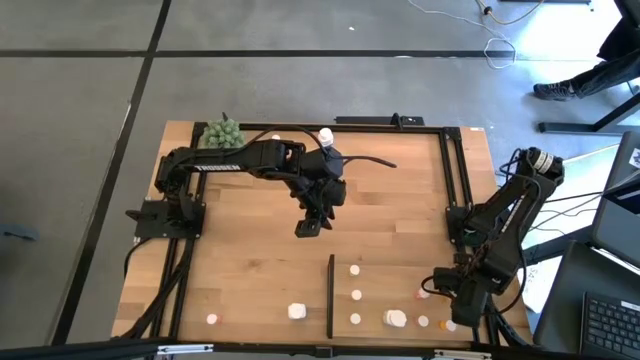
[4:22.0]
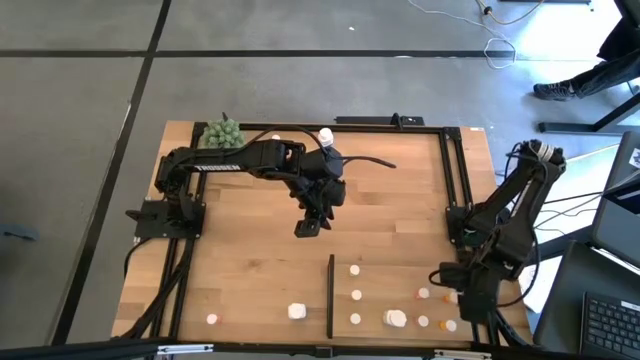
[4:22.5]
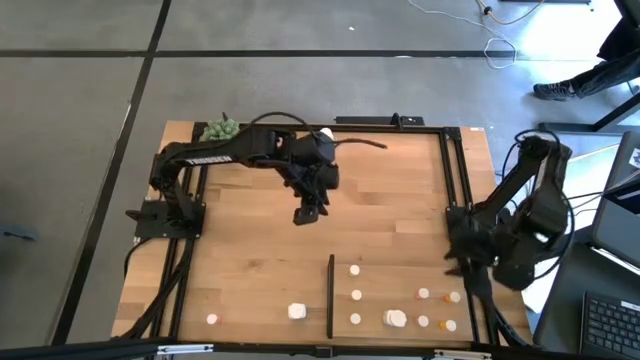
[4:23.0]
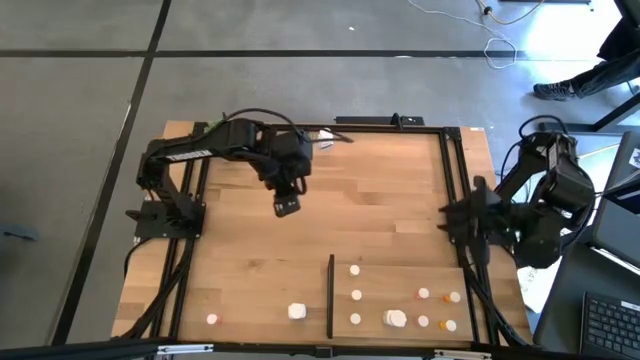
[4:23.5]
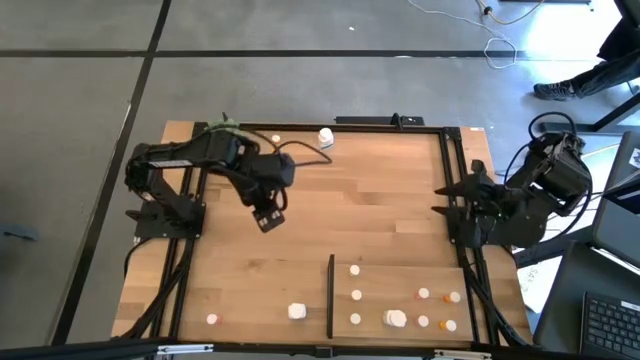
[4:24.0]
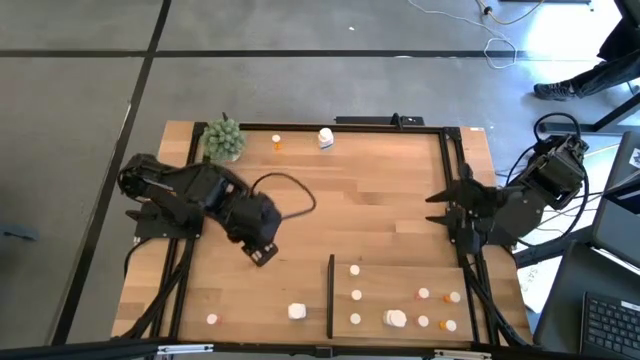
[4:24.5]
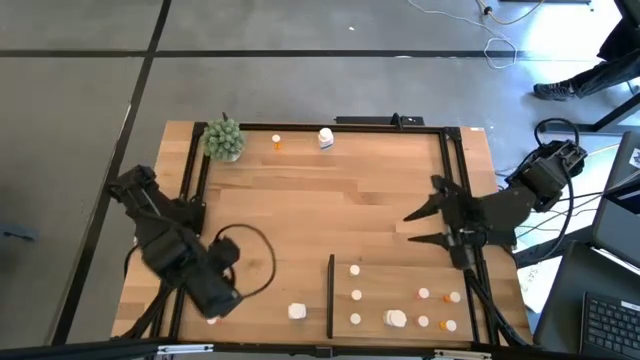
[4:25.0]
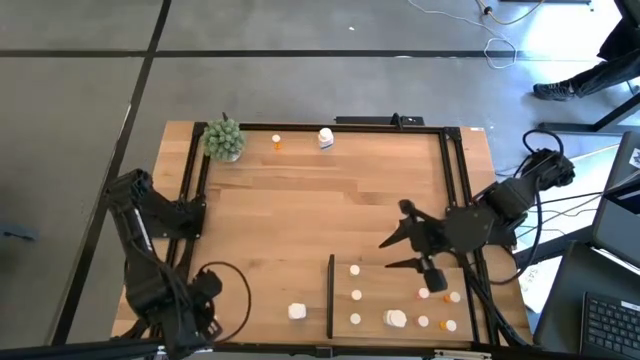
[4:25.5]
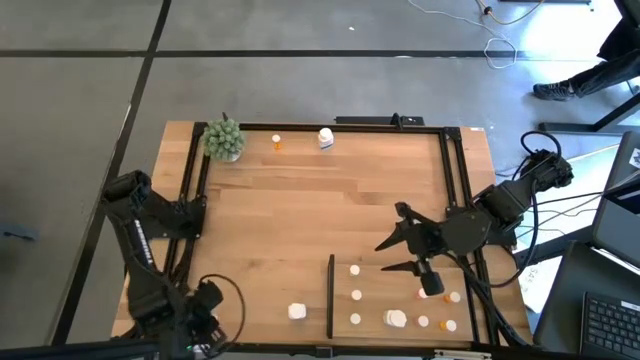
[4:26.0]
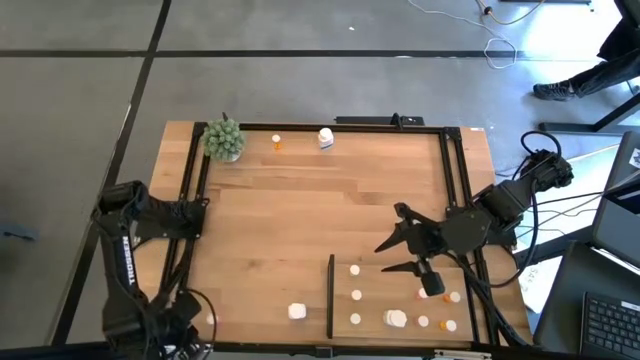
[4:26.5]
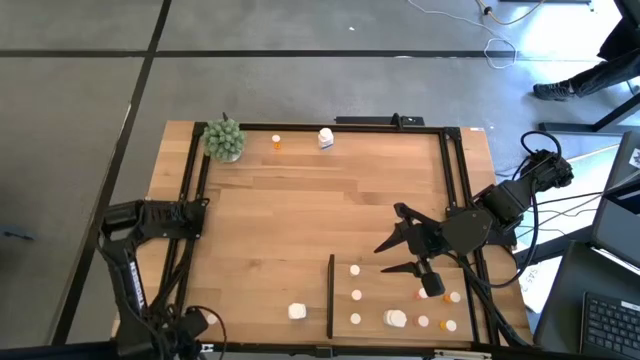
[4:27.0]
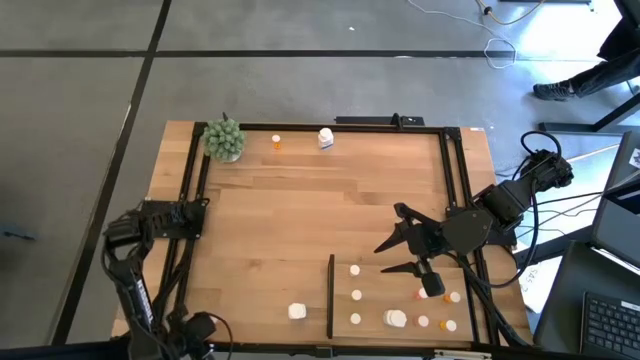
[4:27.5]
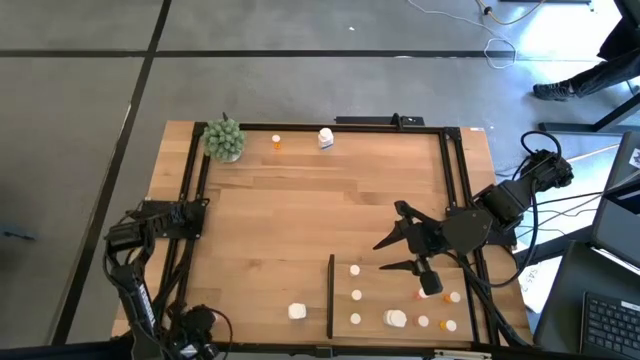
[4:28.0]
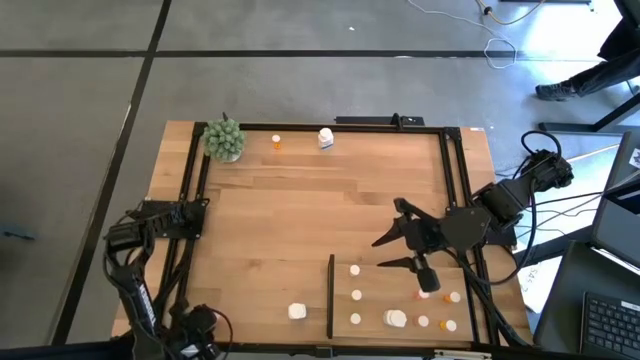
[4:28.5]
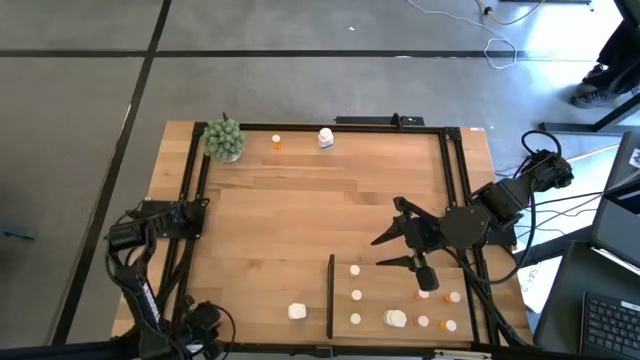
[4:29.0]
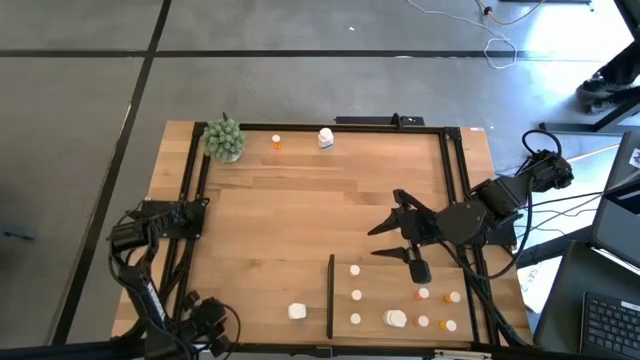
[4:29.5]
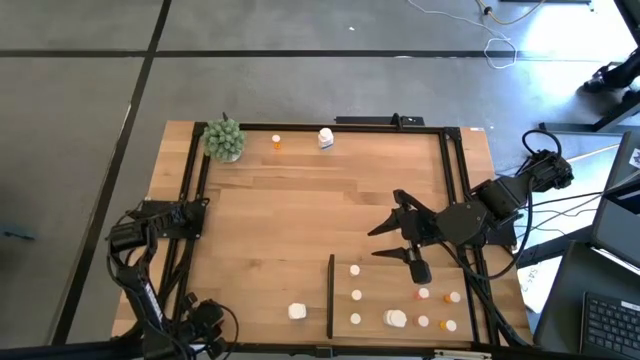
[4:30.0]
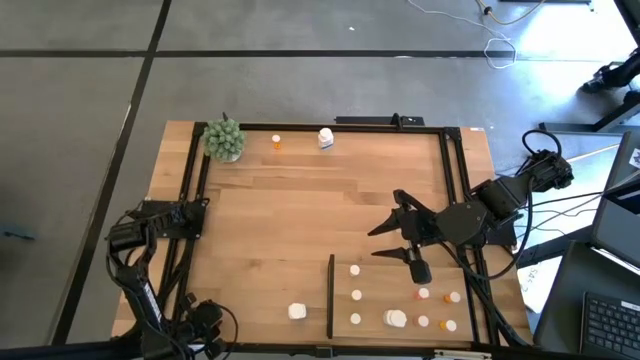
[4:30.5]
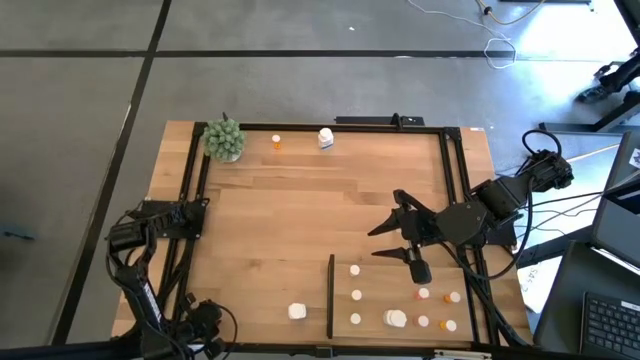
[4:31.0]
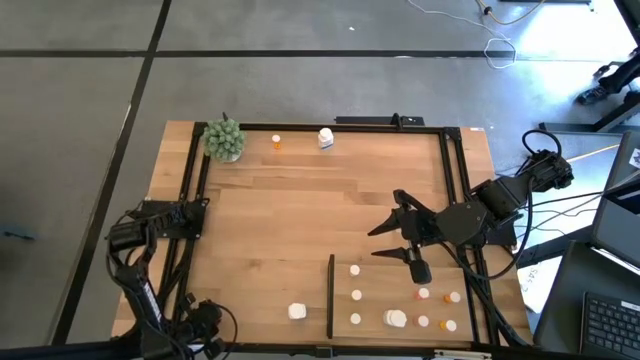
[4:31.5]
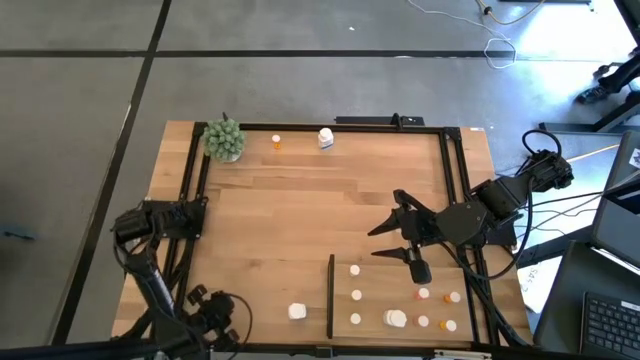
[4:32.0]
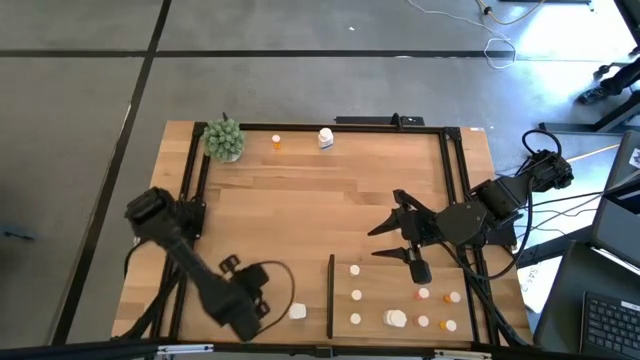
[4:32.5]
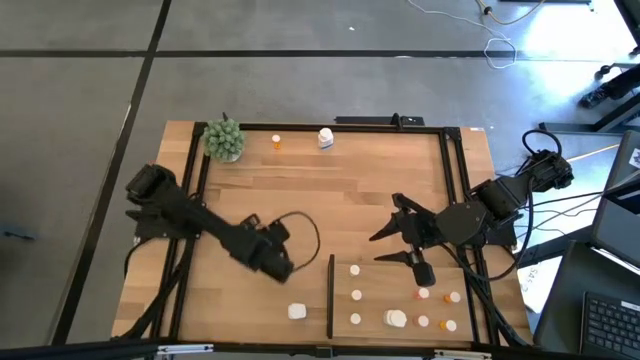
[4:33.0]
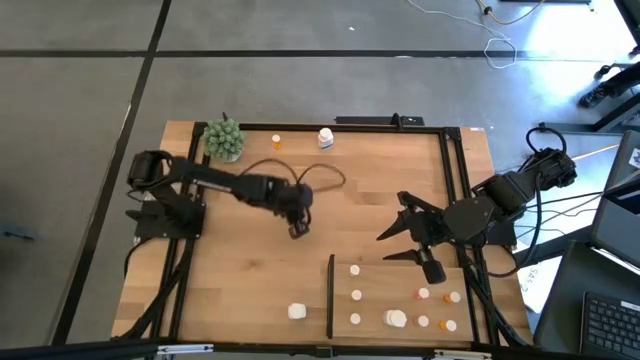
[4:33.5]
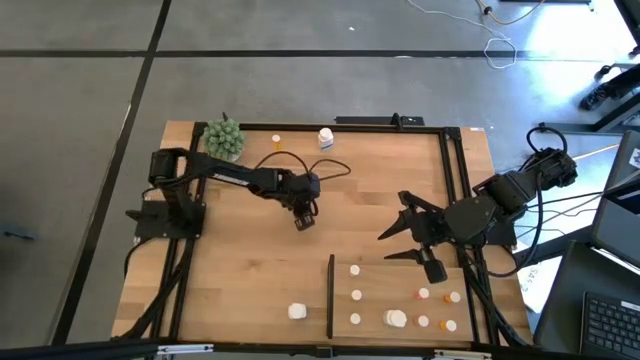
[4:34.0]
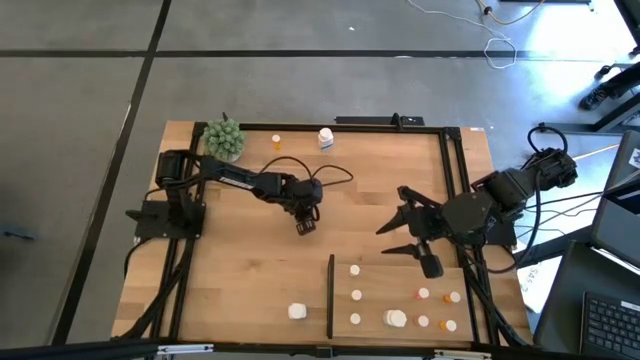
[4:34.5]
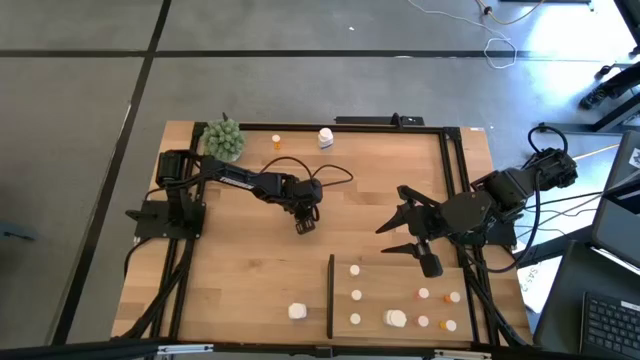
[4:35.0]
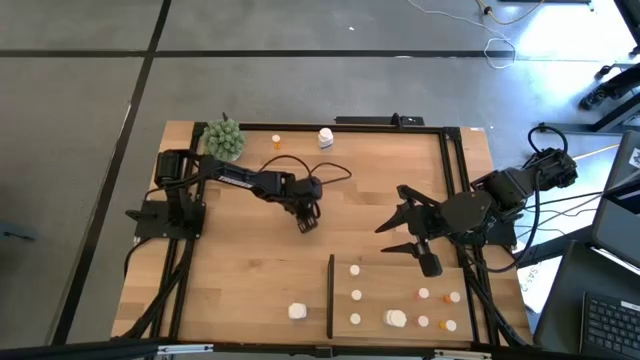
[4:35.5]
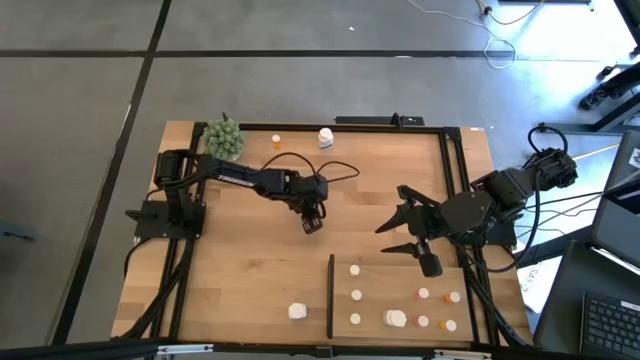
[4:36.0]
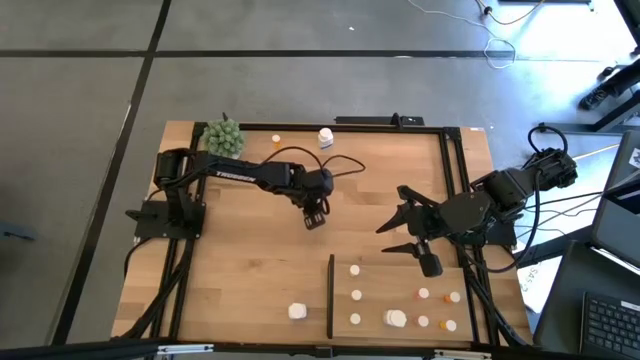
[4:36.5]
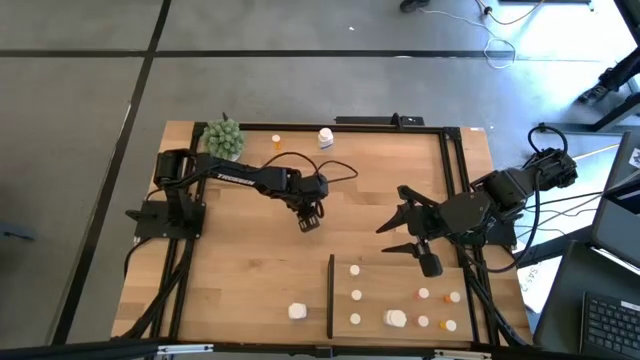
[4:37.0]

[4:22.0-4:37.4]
Task: Pick and place medicine bottles onto shelf by color
Put the pink pill bottle on the shelf aligned with the other pink pill bottles

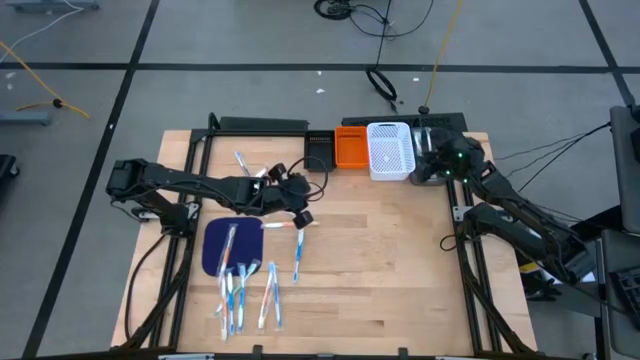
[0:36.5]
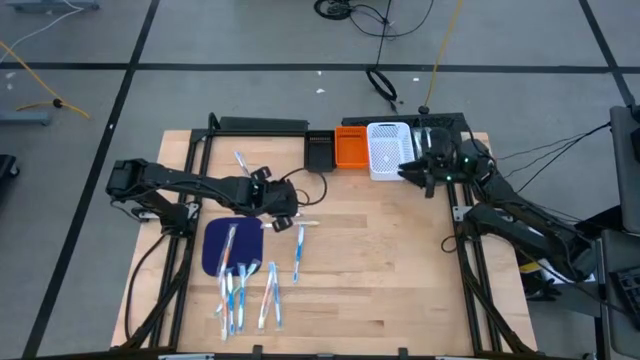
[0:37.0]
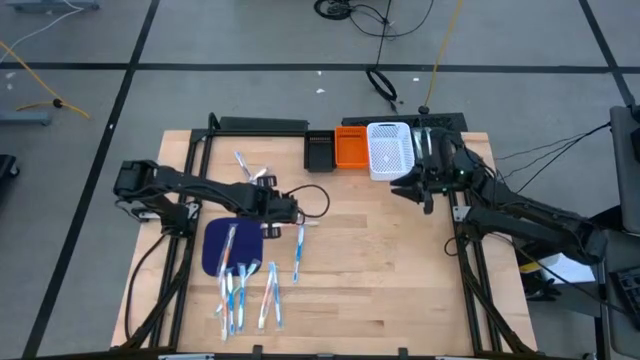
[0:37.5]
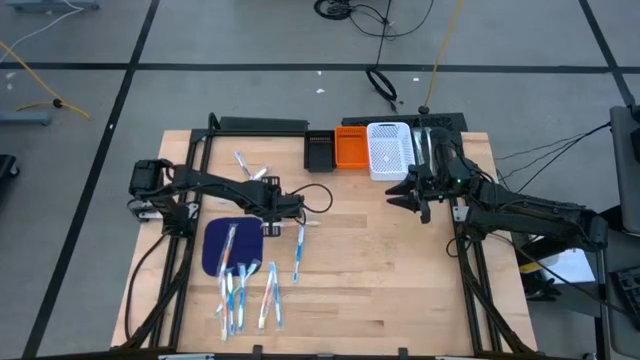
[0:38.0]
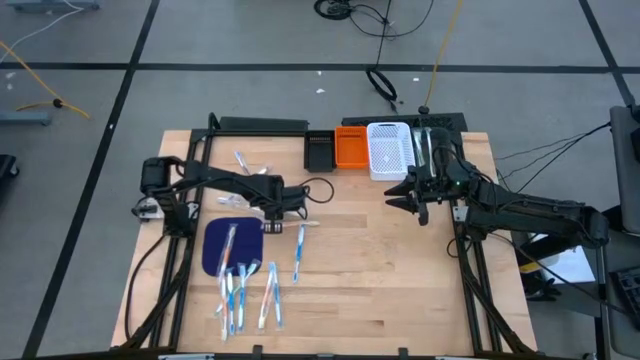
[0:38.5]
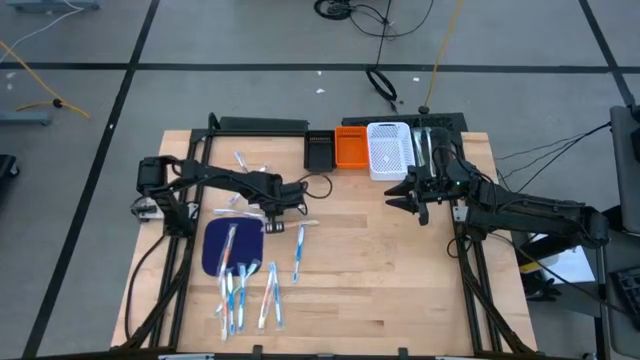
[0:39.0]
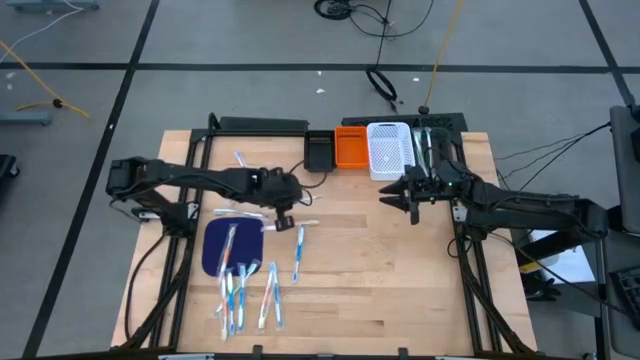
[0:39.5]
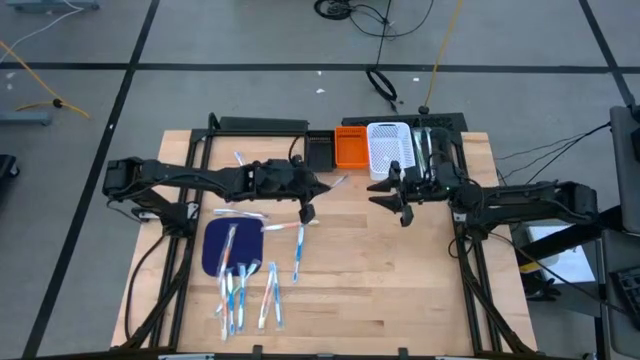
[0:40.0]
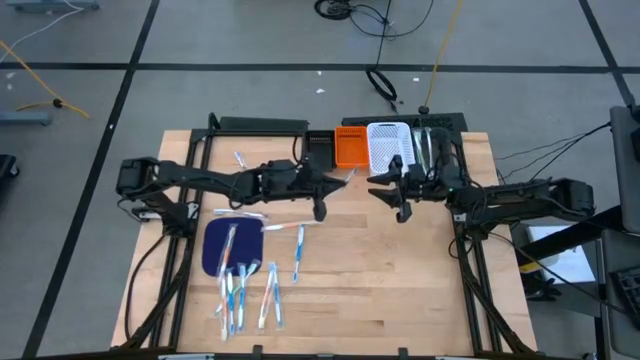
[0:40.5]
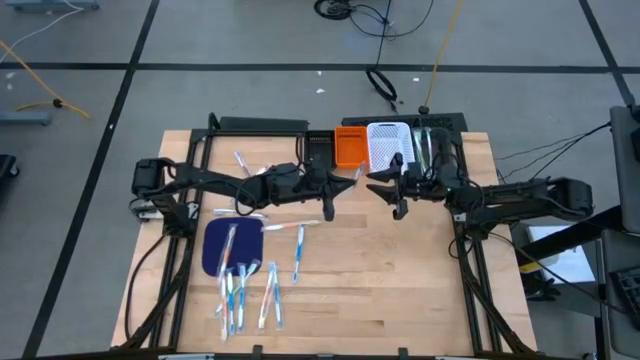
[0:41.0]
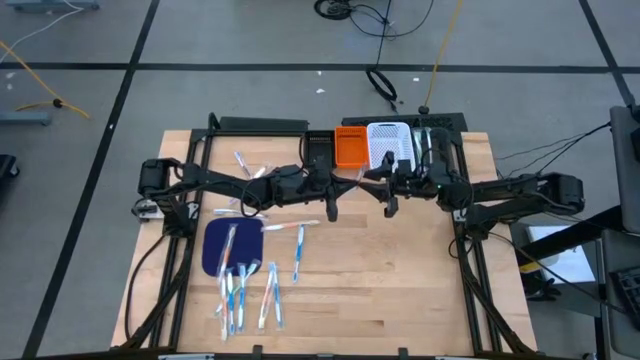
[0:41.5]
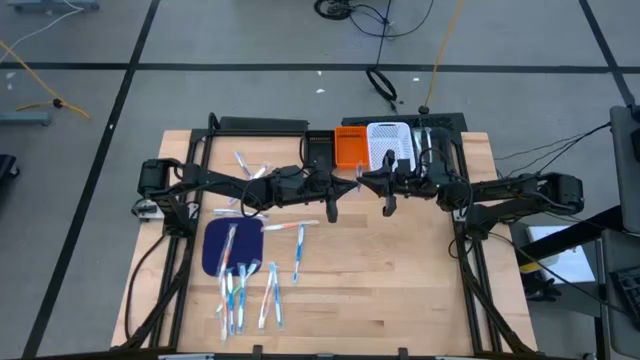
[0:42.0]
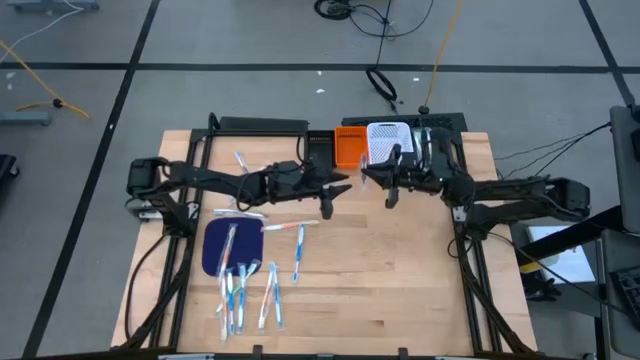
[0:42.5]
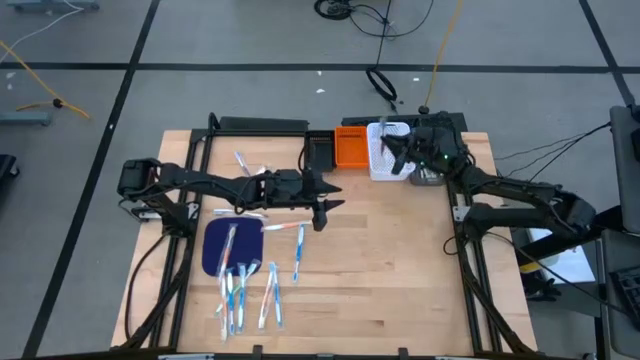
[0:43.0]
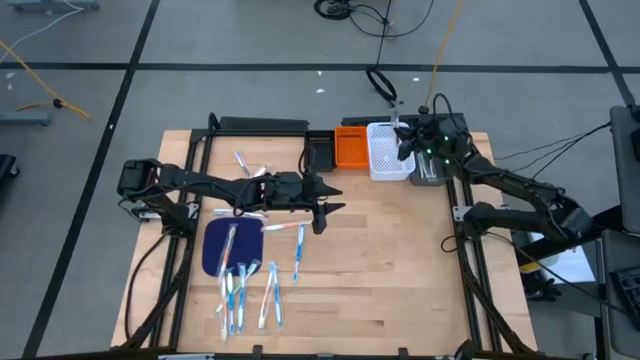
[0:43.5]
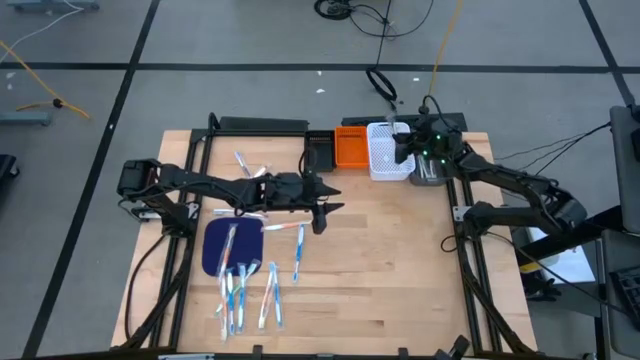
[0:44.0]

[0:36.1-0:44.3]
Task: Pick & Place Toothbrushes
Put the purple toothbrush into the white bin
